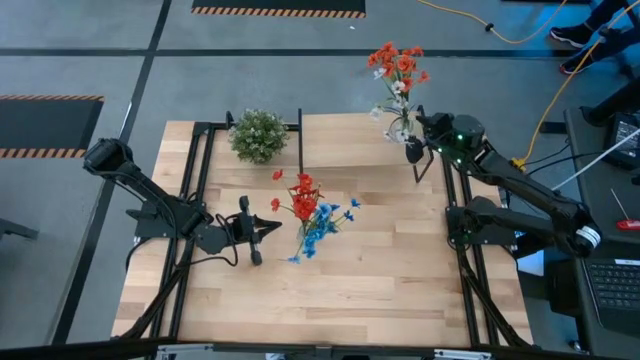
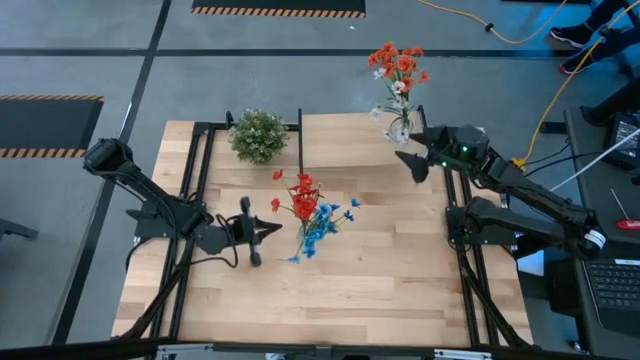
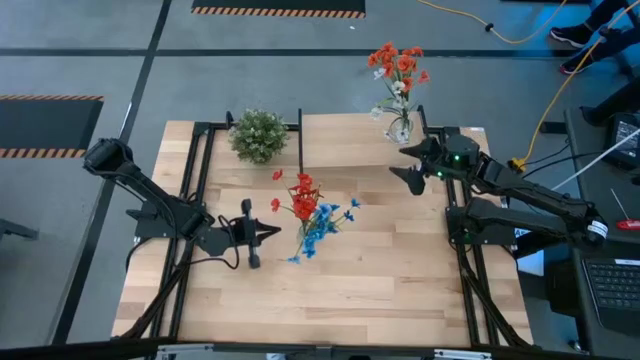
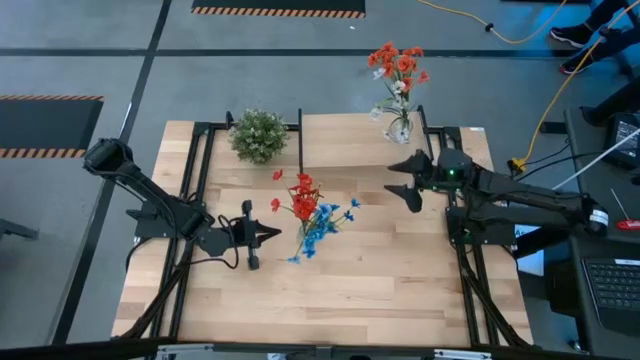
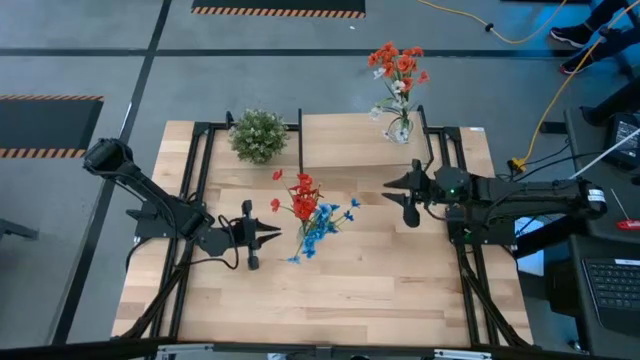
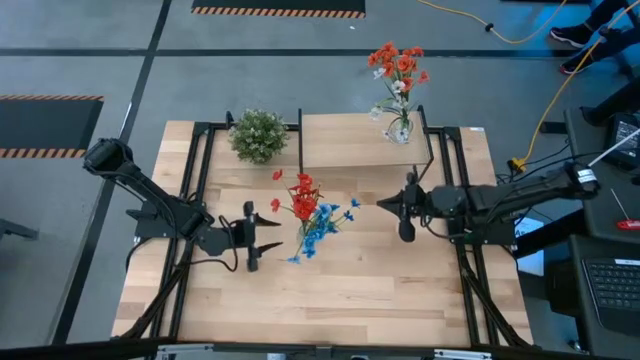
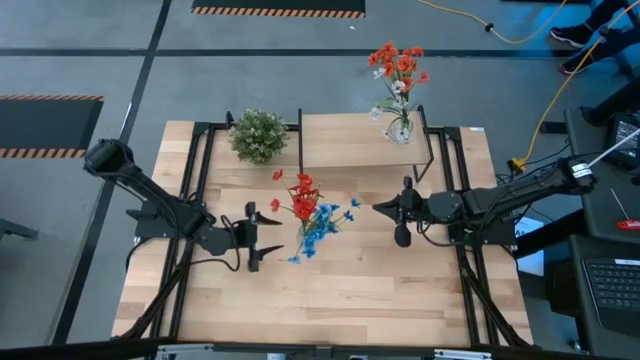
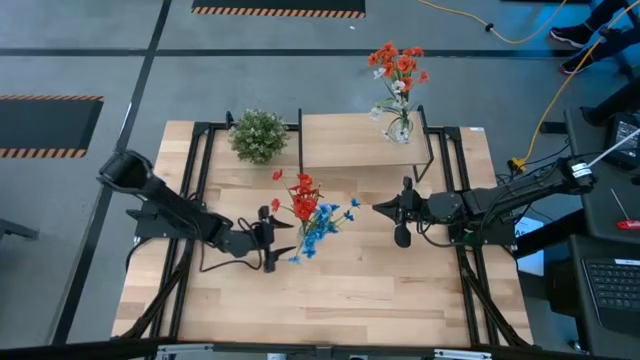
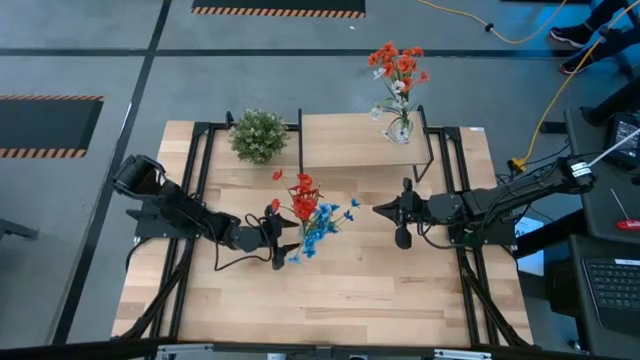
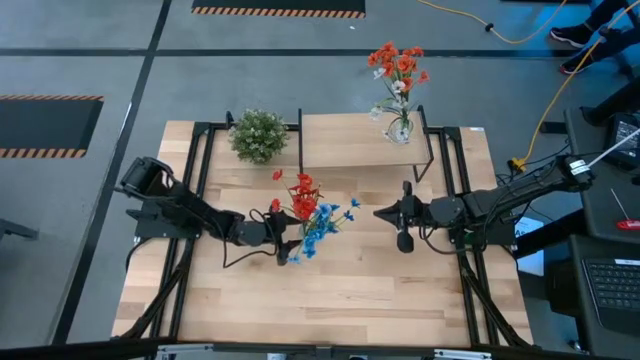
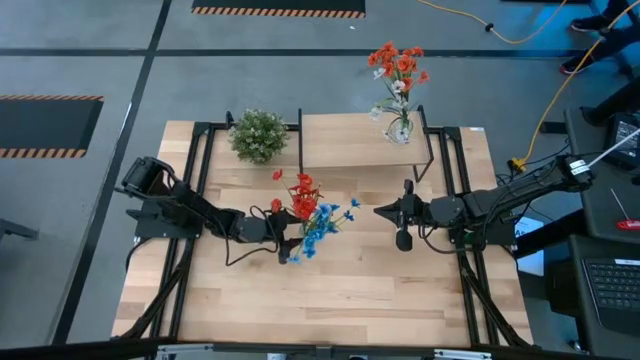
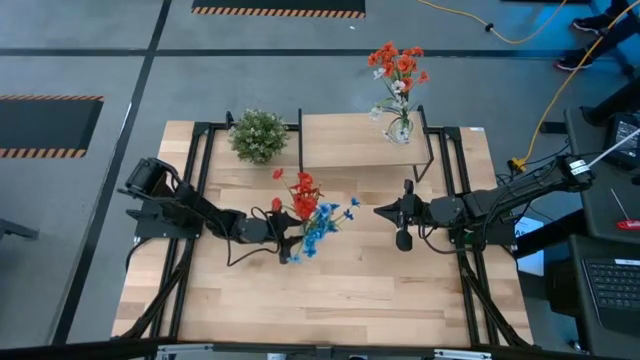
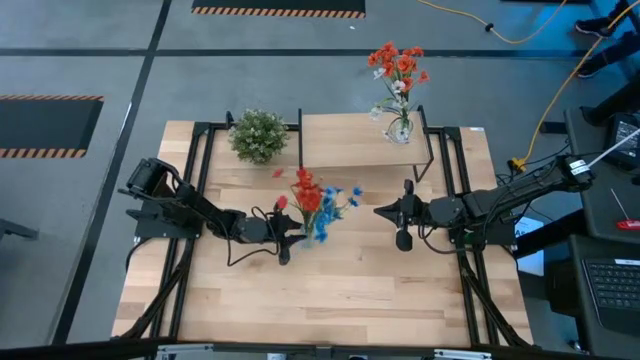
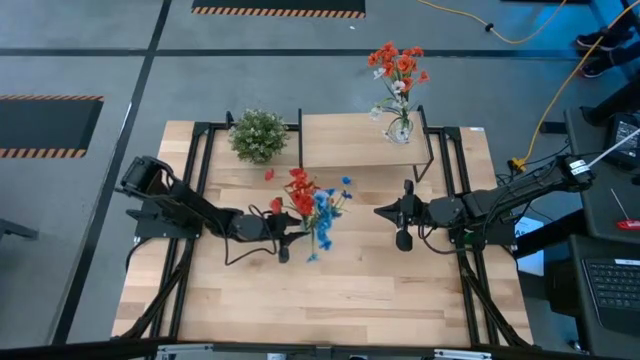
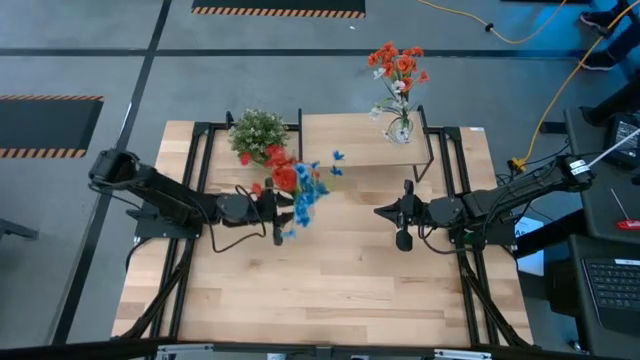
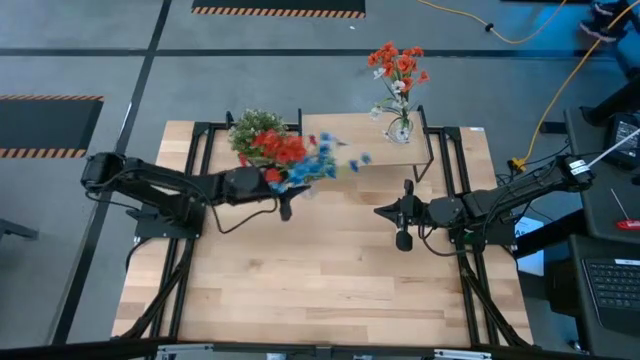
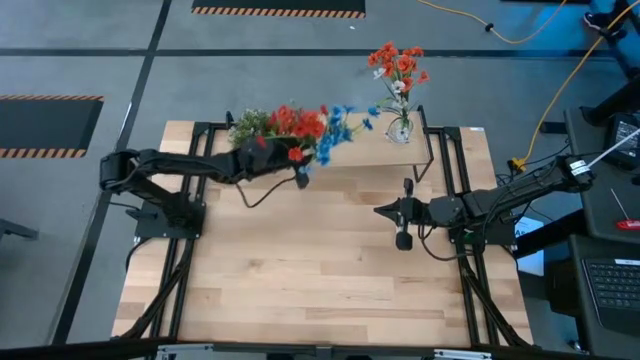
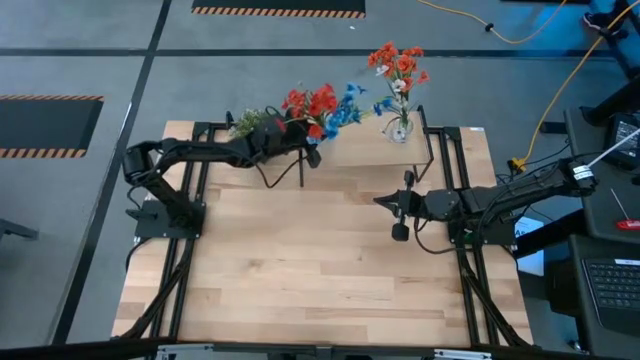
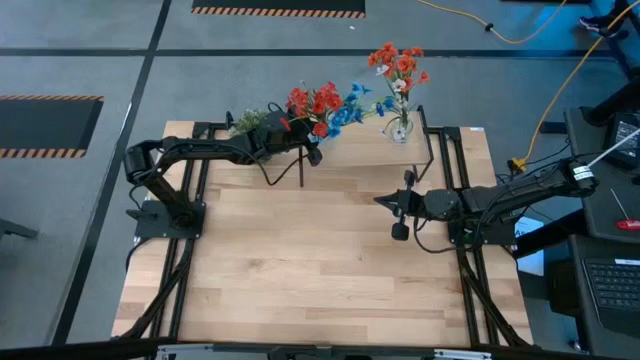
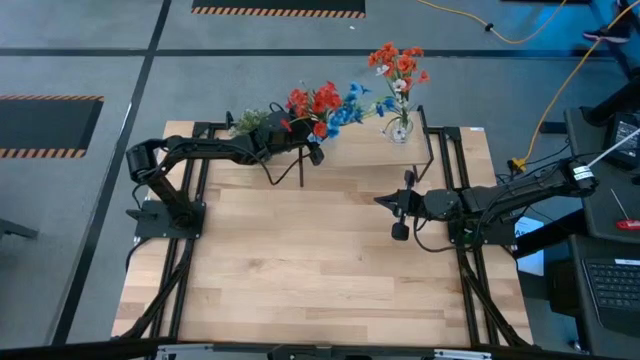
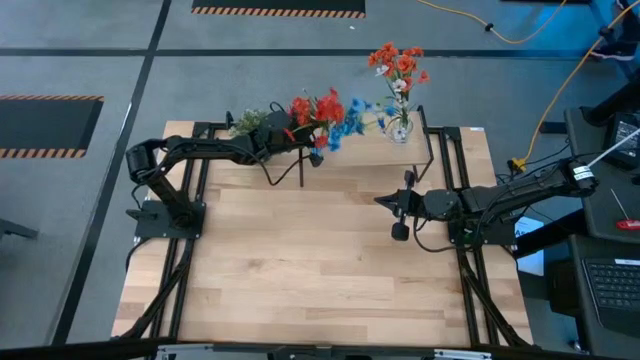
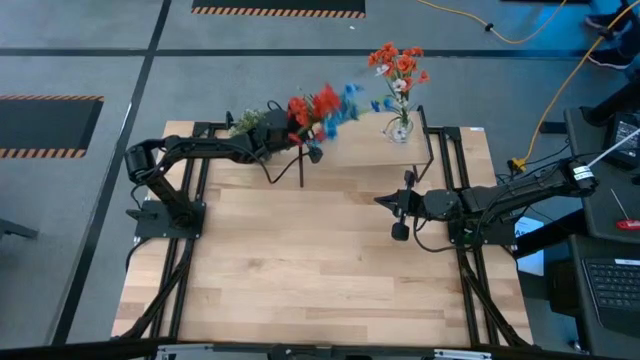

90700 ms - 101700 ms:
Task: Pick and place flowers into a vace then onto a shelf
Put the bottom transparent vase on the shelf

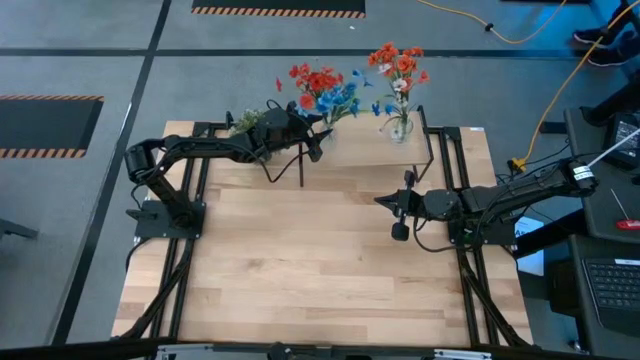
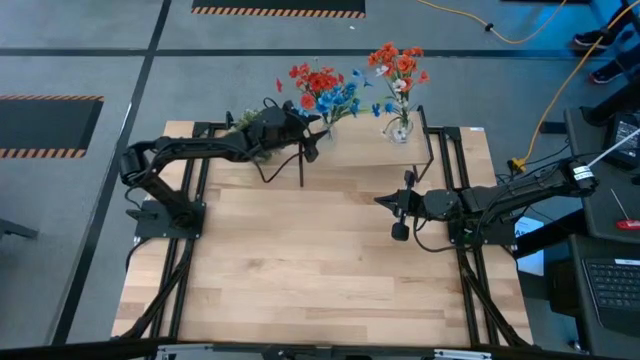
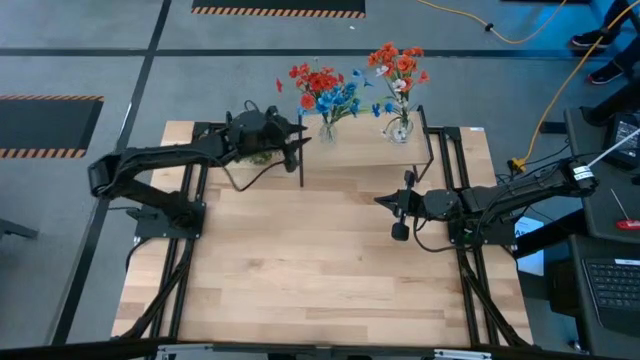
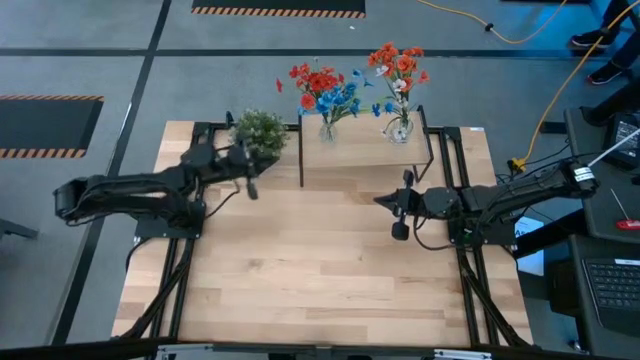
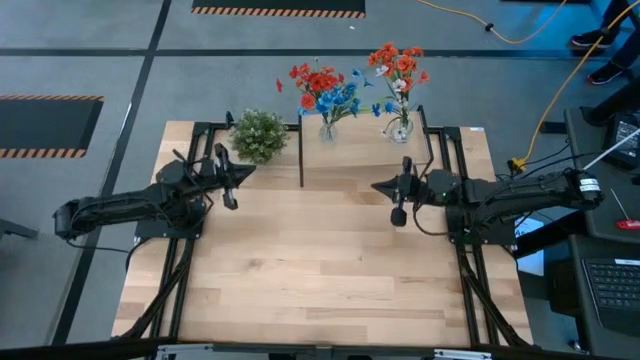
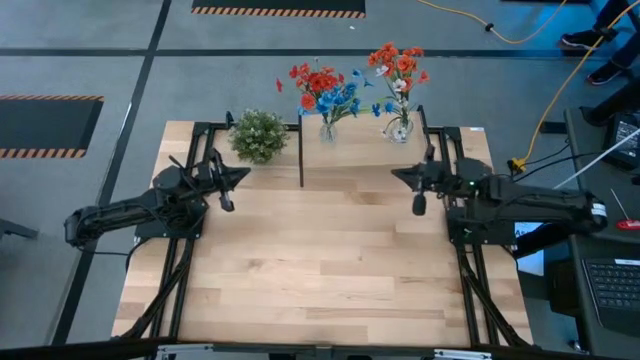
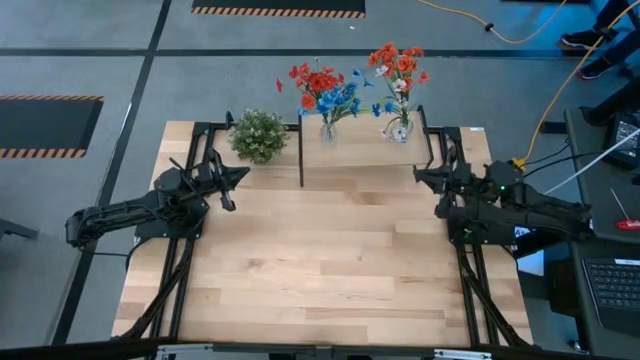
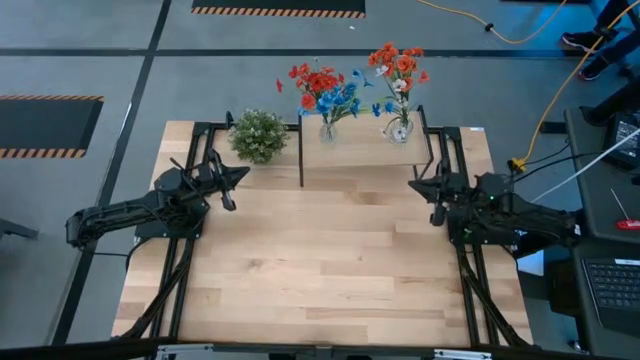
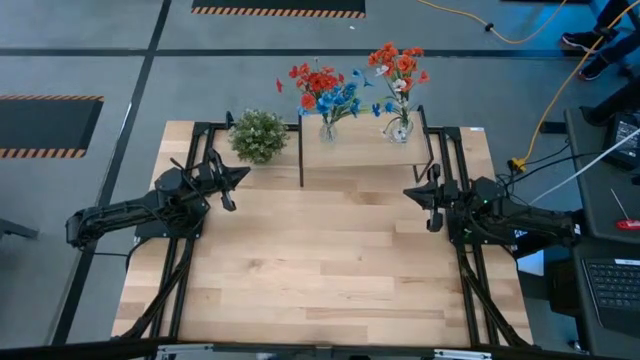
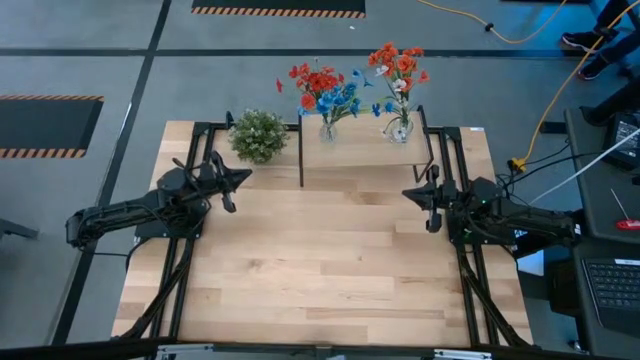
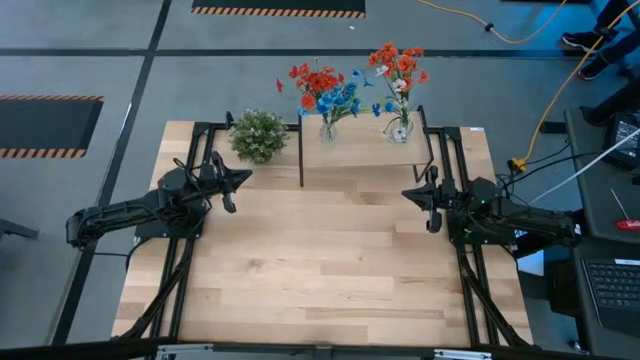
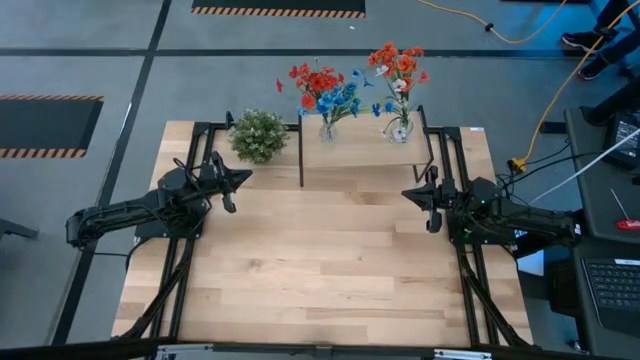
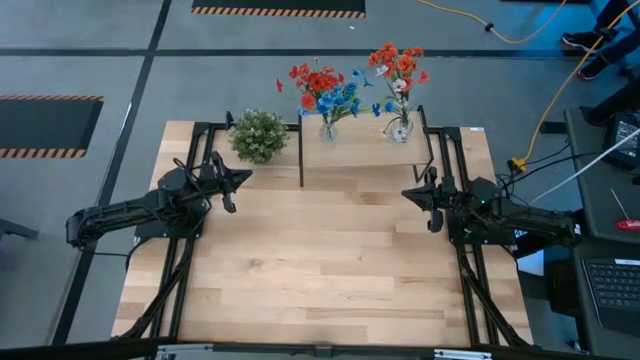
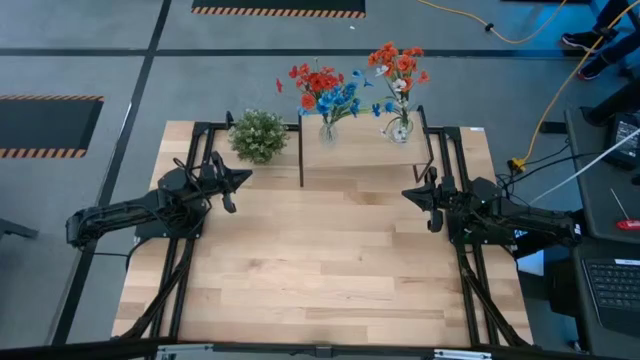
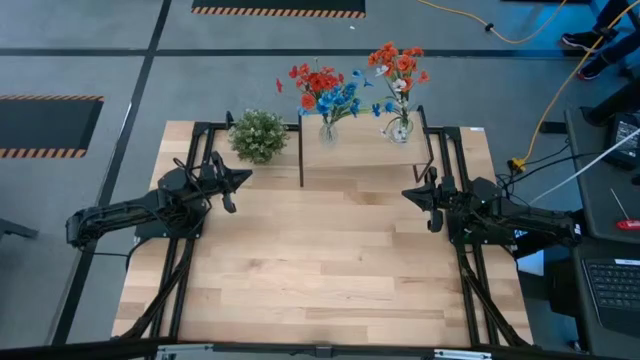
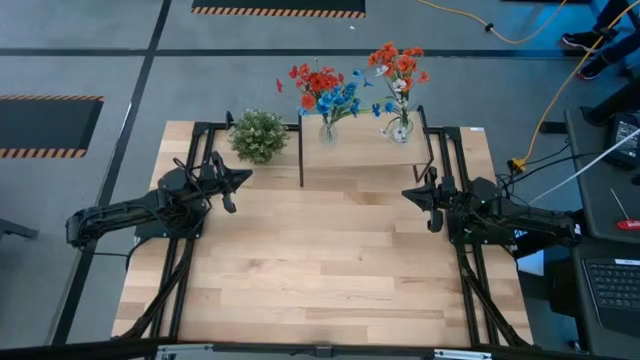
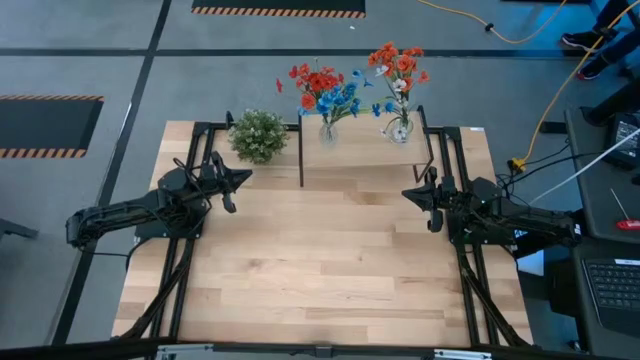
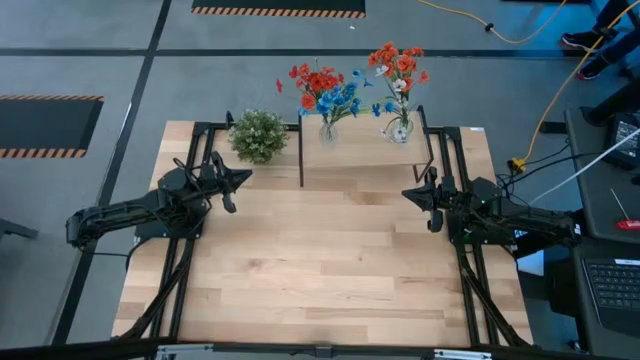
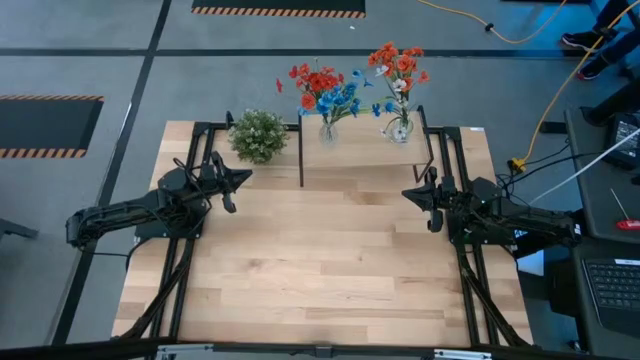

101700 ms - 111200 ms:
Return to Home Position
